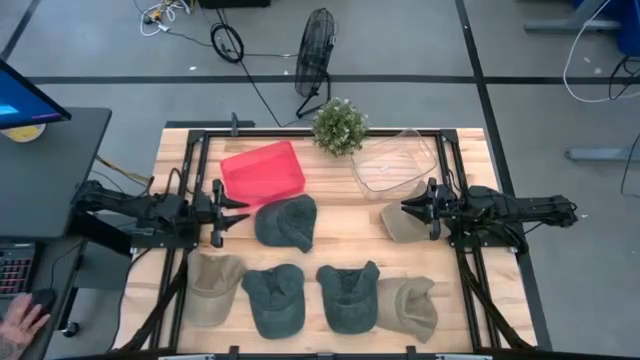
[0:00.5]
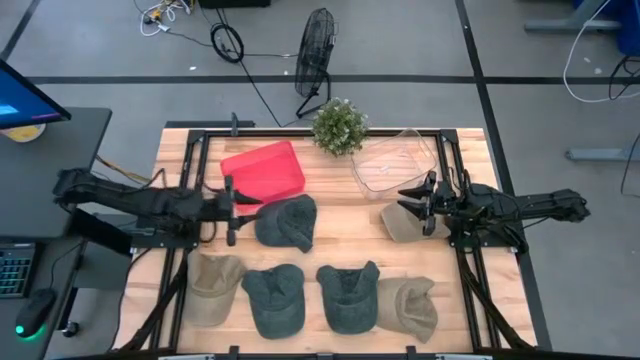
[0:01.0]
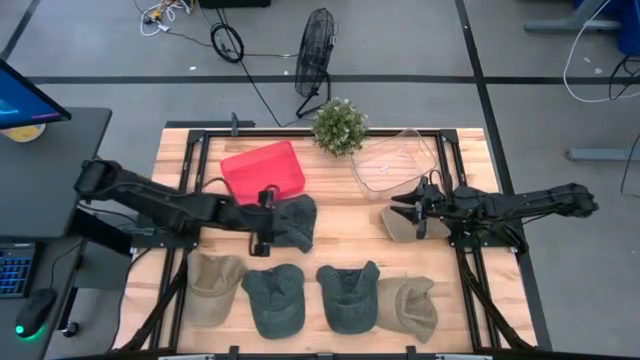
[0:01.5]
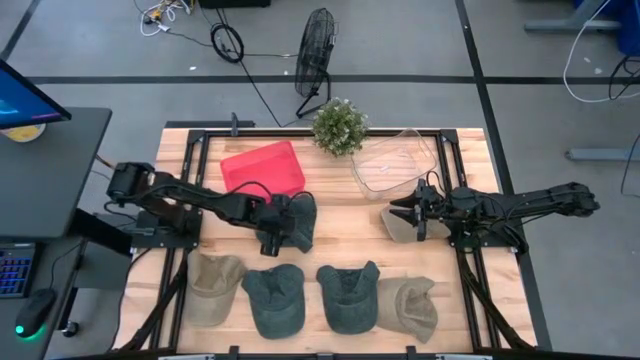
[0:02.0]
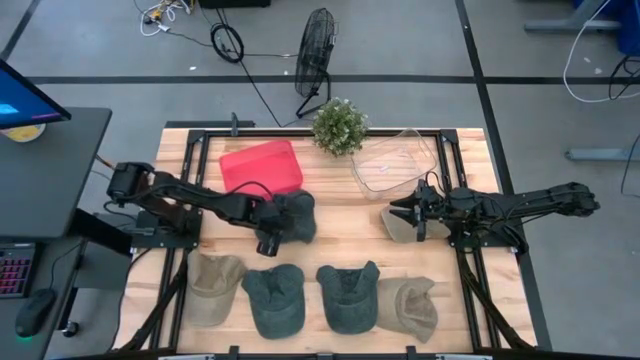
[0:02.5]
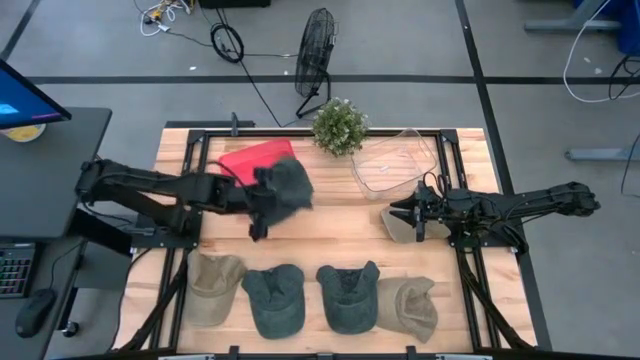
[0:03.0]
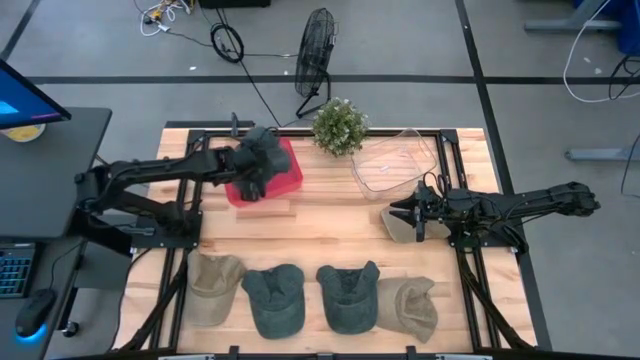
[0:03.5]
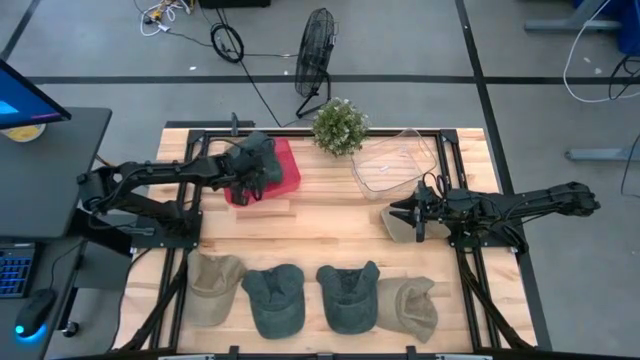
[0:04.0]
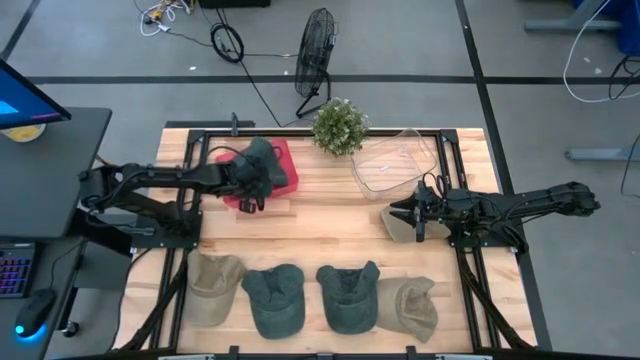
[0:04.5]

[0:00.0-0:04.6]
Task: Pick & Place hat
Put the top black cap into the pink bin

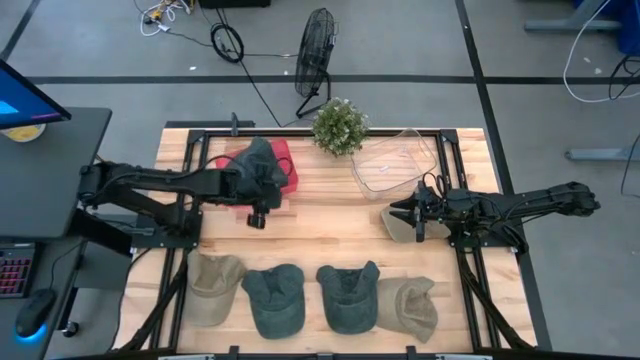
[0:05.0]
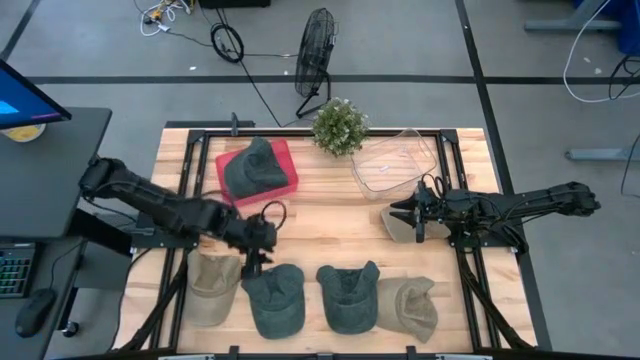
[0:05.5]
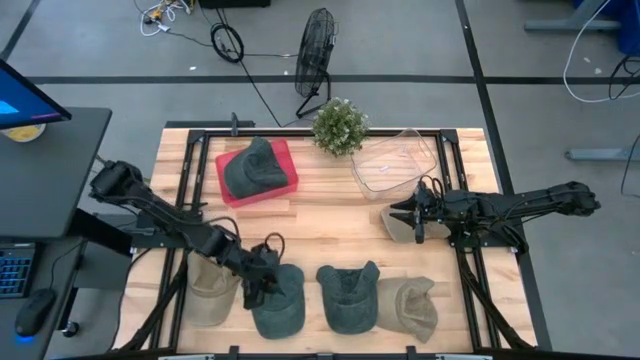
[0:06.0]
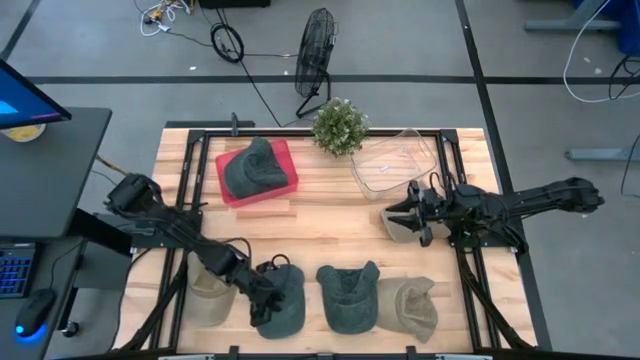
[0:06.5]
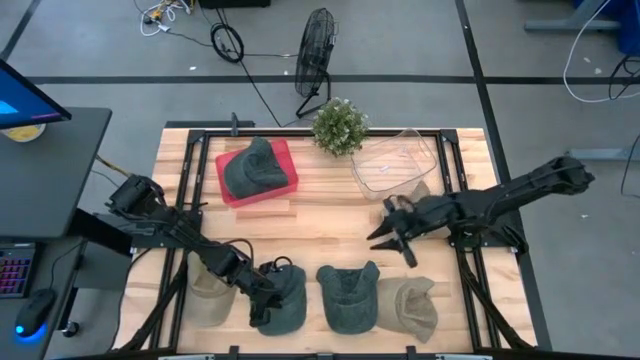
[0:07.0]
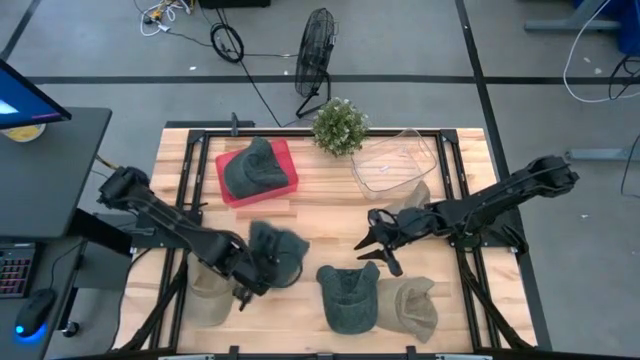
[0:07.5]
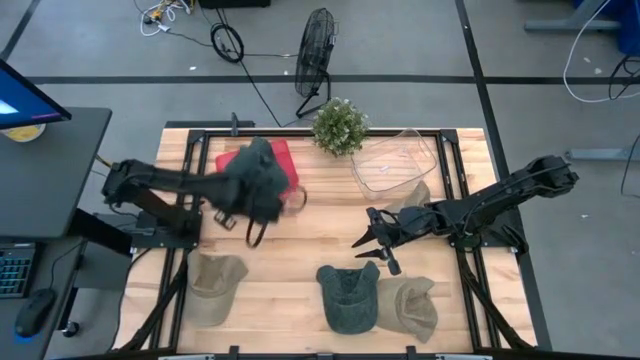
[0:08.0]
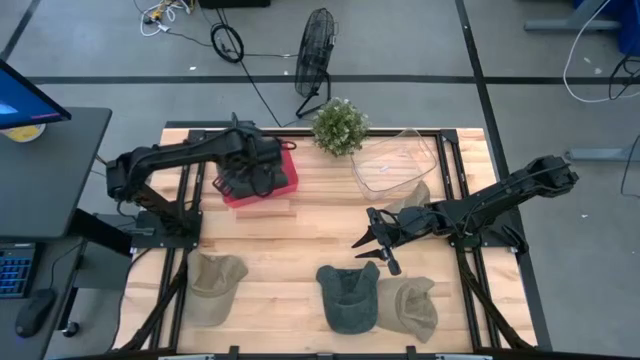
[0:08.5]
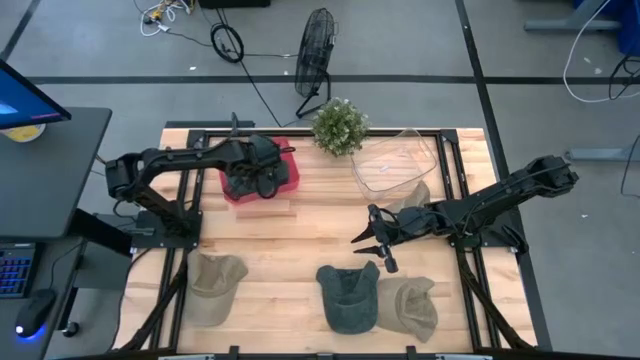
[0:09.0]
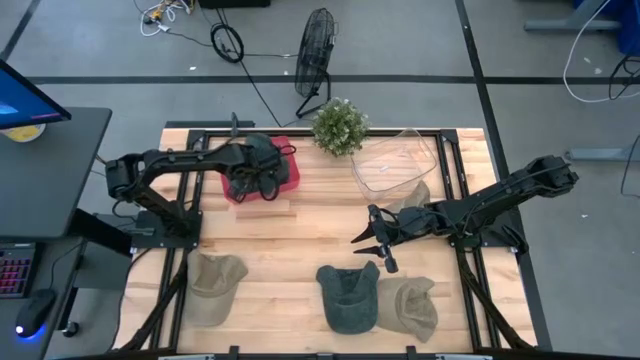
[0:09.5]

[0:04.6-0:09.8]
Put the left black cap into the pink bin

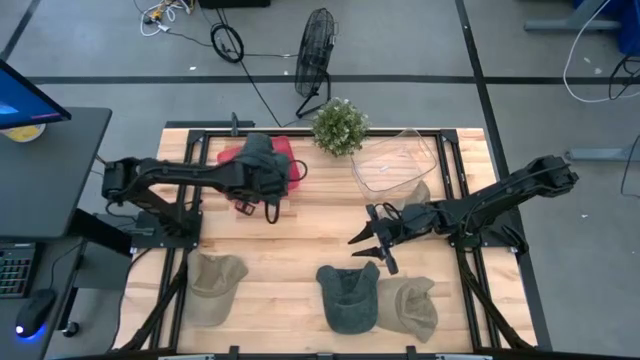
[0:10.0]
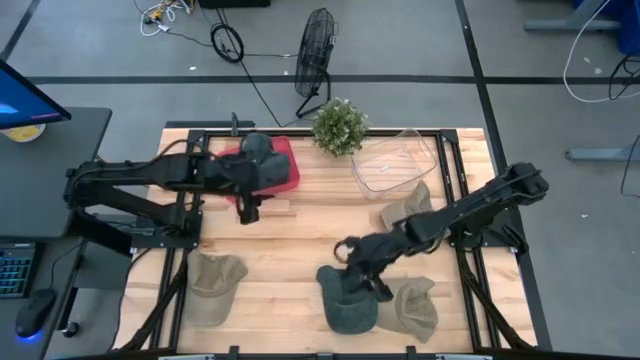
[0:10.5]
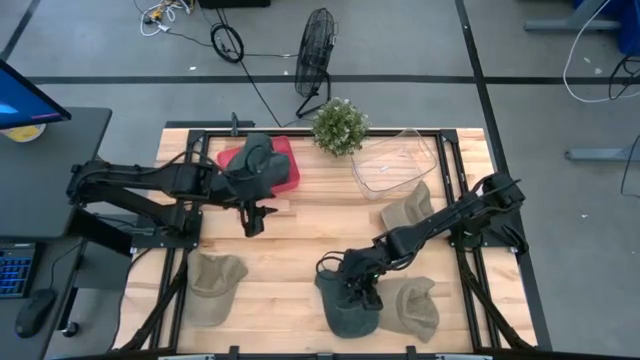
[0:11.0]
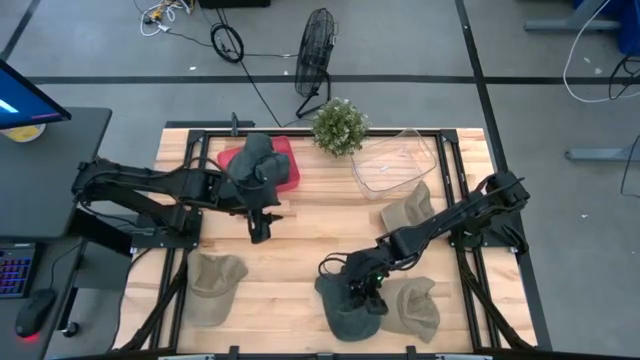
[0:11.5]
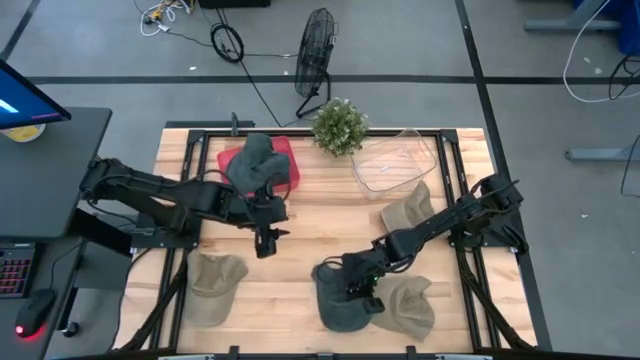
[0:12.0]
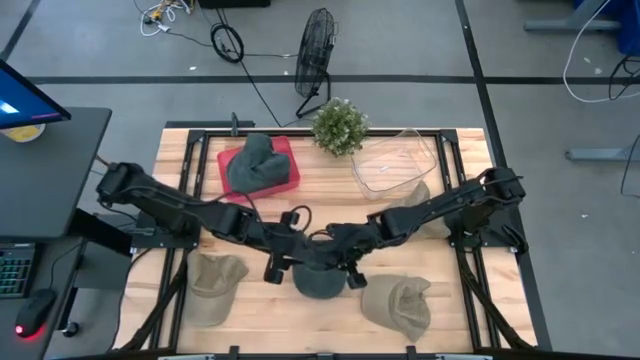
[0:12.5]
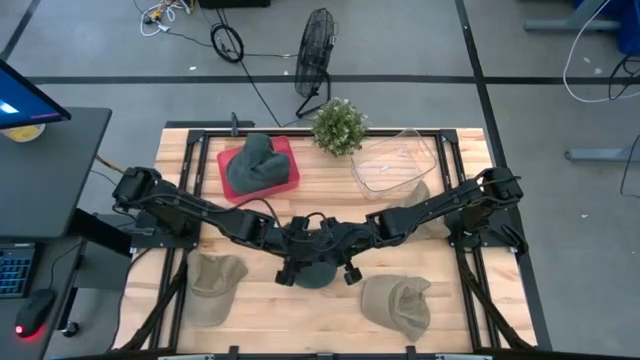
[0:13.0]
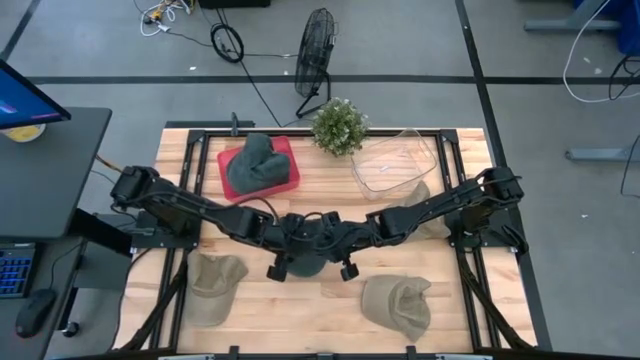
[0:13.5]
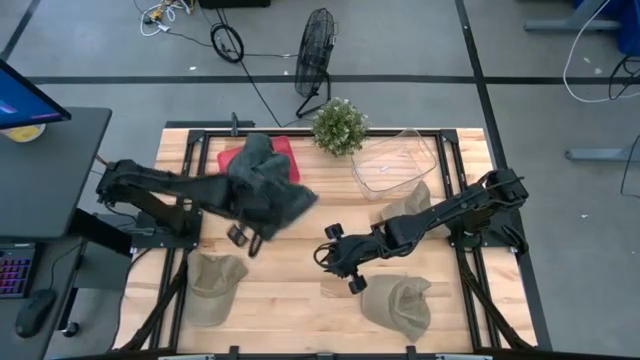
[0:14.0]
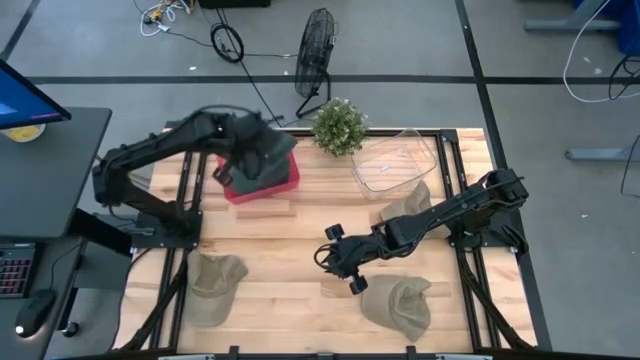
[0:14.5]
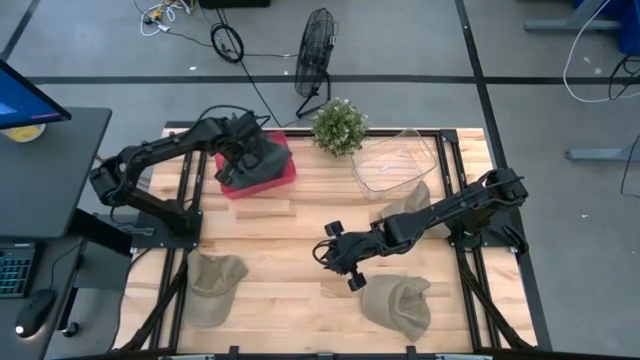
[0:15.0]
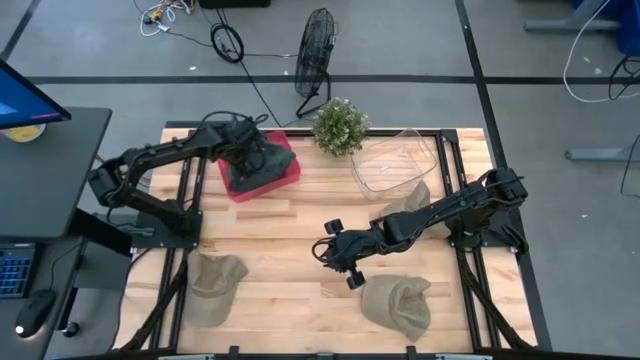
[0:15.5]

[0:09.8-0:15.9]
Put the black cap into the pink bin

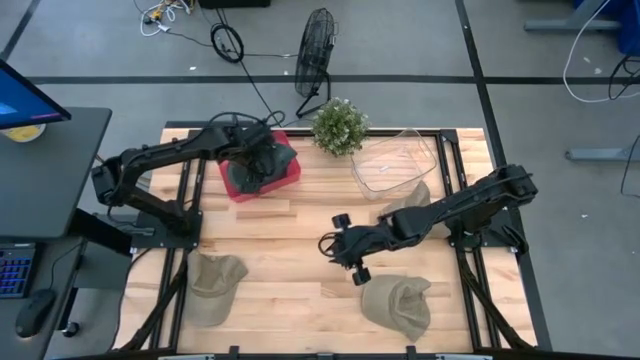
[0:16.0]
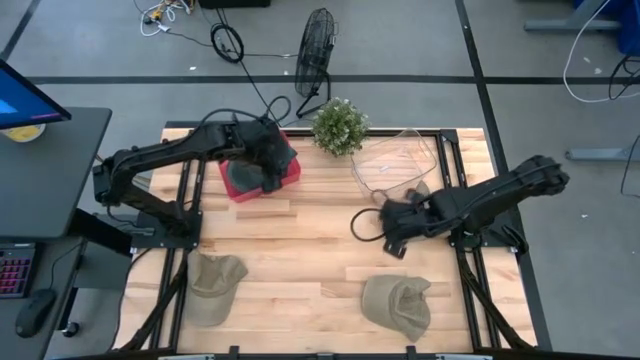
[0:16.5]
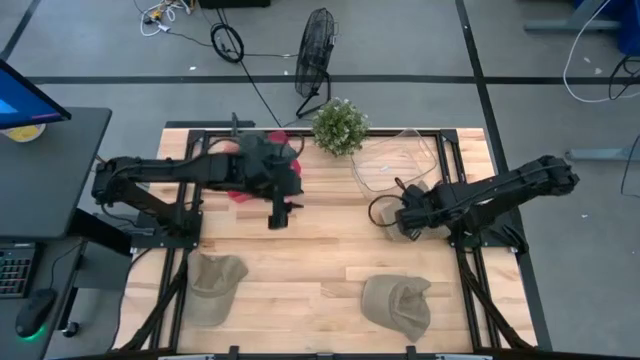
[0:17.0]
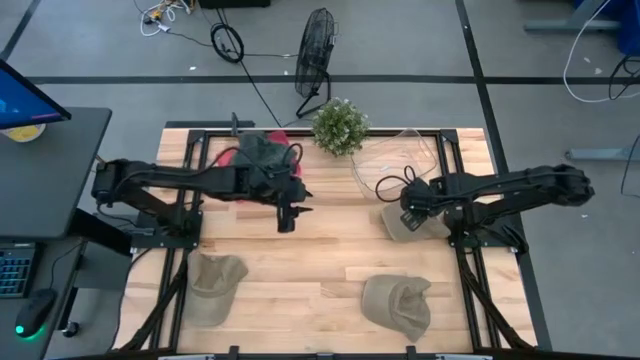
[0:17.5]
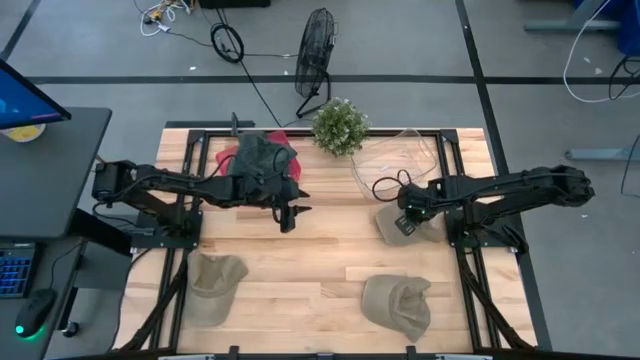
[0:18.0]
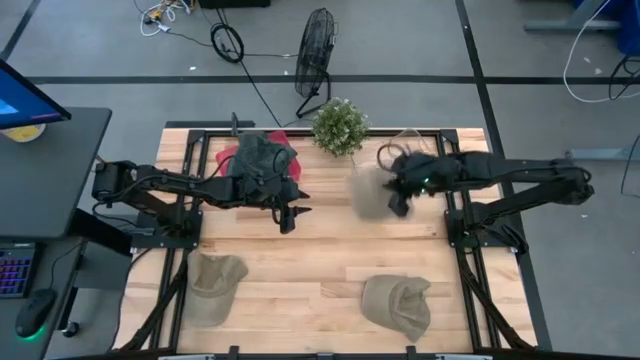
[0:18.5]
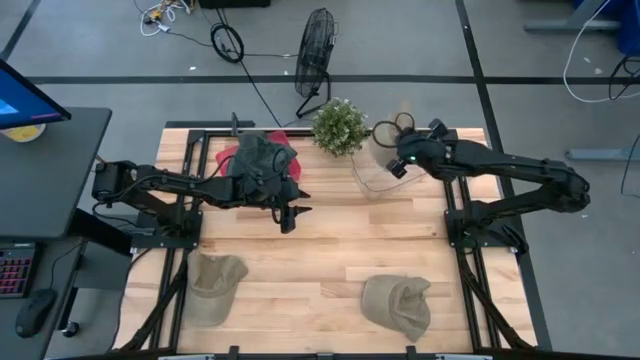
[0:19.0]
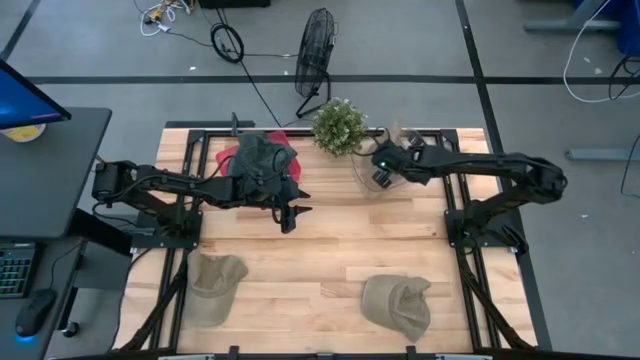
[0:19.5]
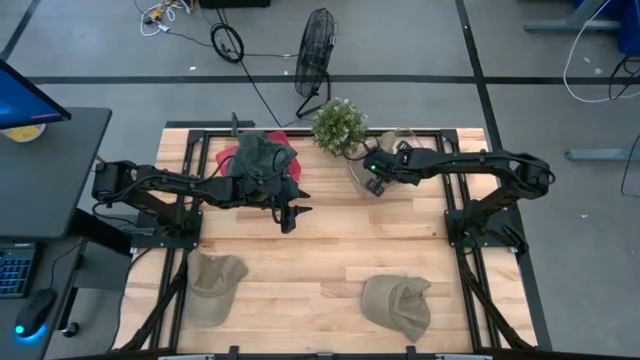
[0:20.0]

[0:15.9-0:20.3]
Put the top brown cap into the transparent bin
